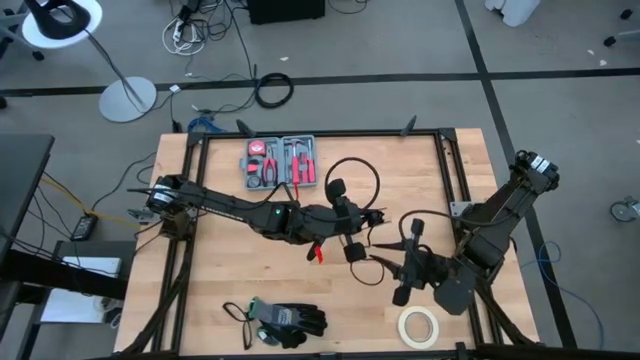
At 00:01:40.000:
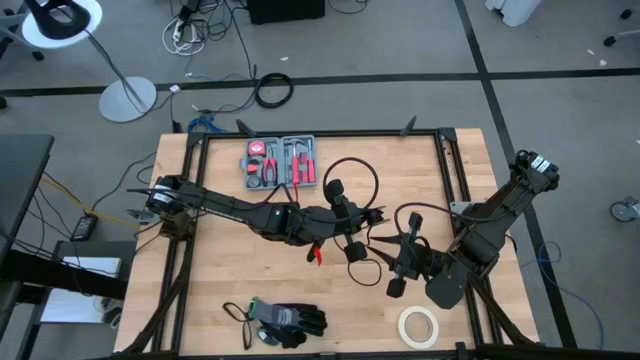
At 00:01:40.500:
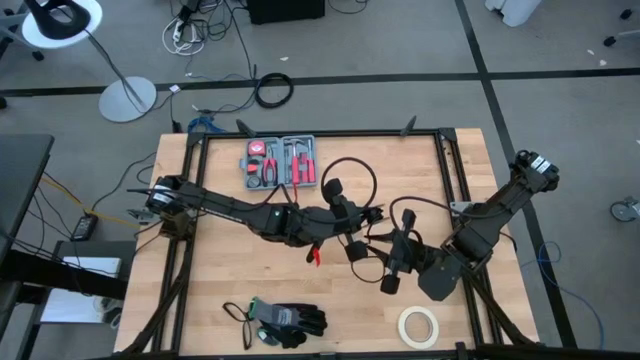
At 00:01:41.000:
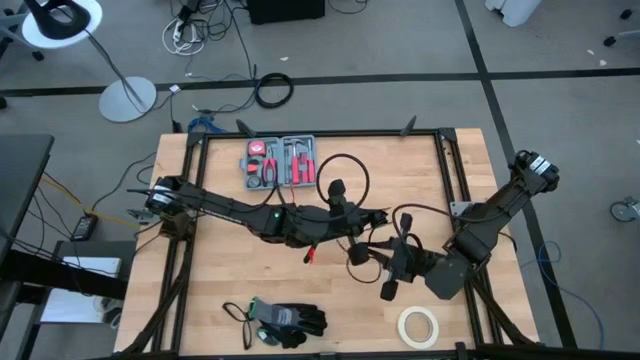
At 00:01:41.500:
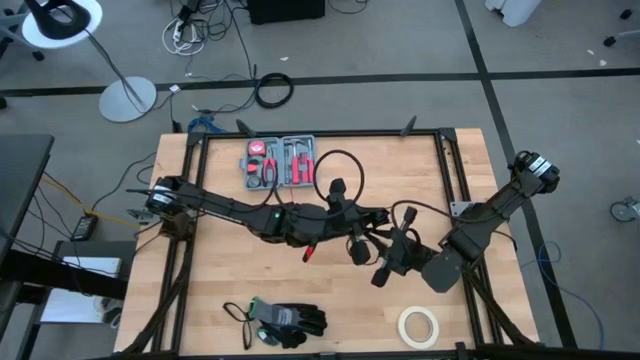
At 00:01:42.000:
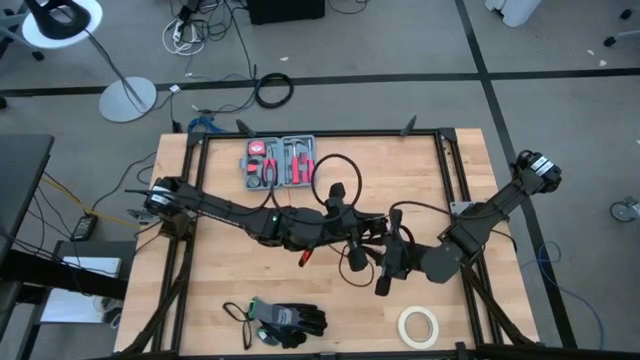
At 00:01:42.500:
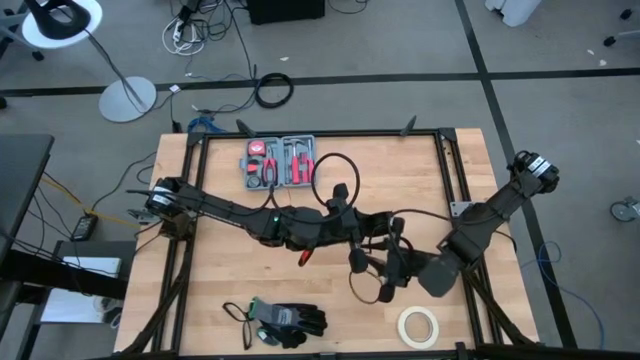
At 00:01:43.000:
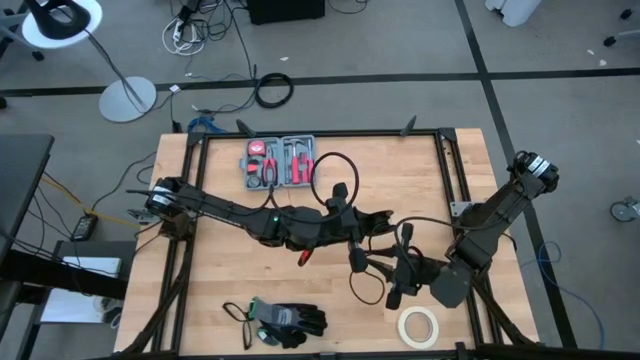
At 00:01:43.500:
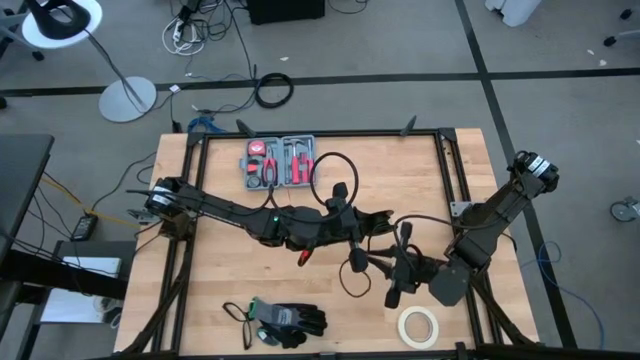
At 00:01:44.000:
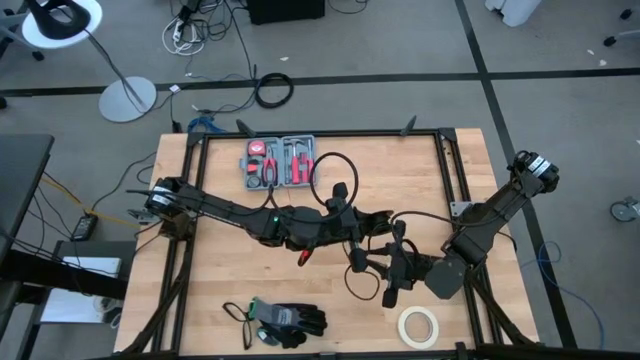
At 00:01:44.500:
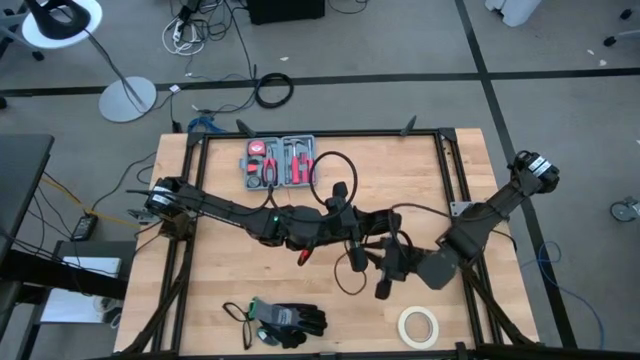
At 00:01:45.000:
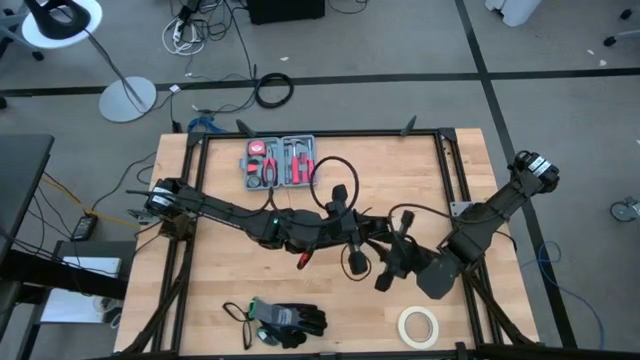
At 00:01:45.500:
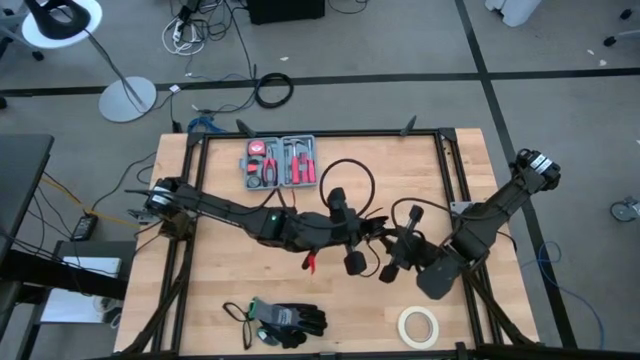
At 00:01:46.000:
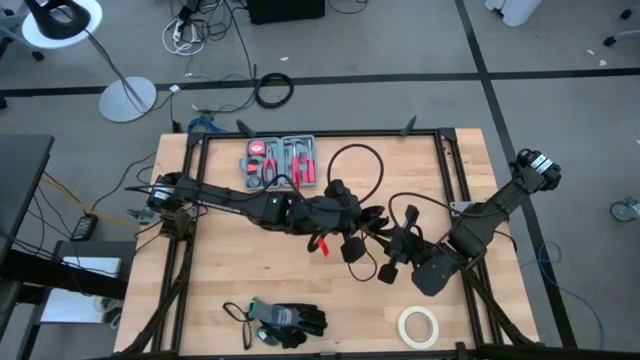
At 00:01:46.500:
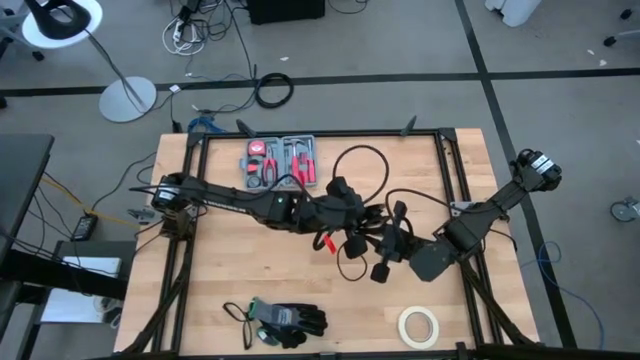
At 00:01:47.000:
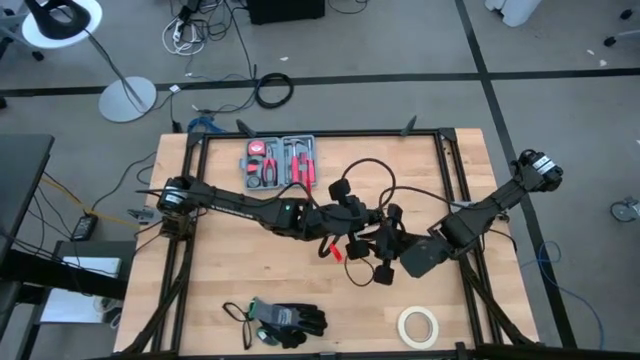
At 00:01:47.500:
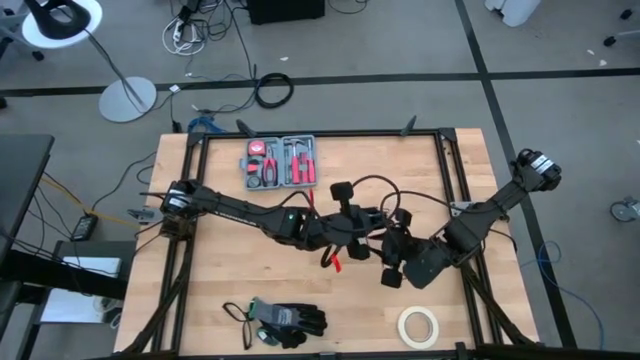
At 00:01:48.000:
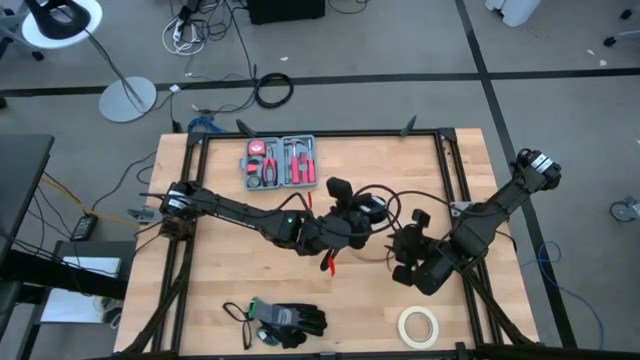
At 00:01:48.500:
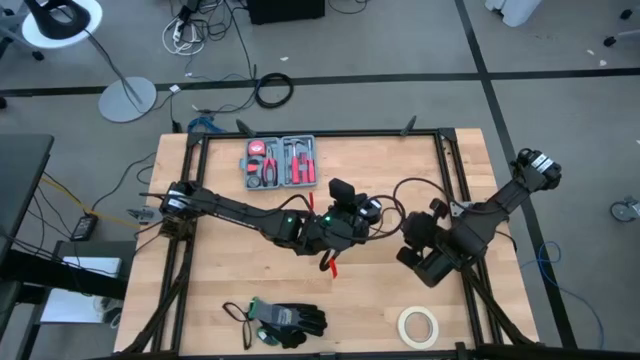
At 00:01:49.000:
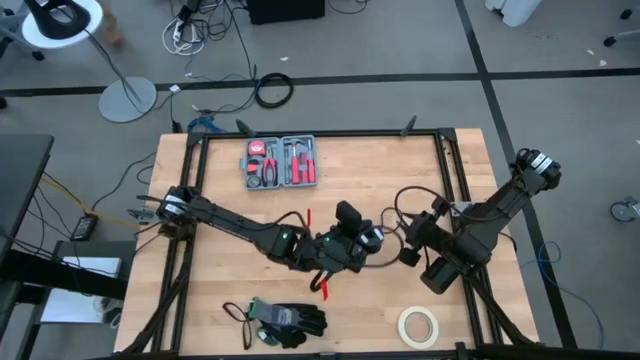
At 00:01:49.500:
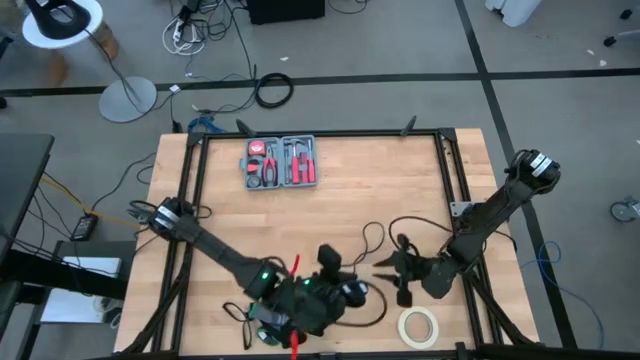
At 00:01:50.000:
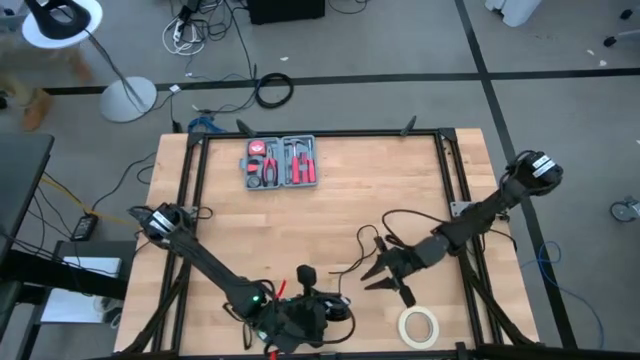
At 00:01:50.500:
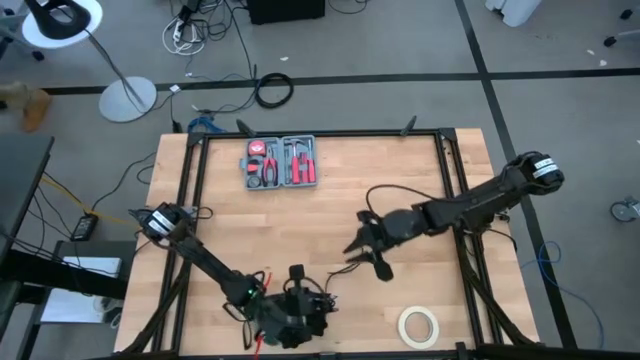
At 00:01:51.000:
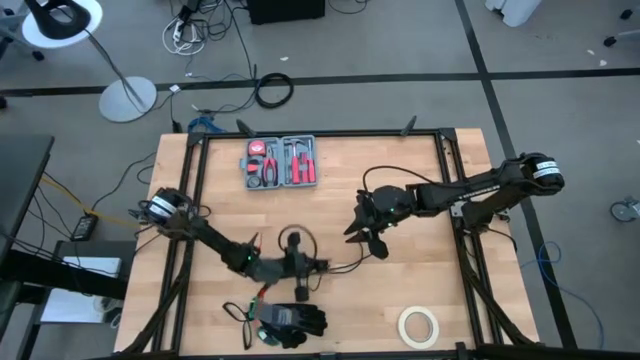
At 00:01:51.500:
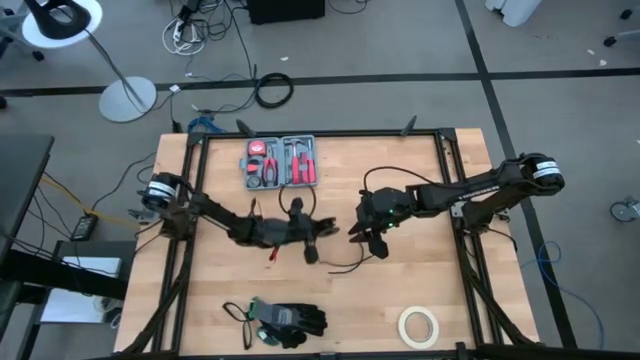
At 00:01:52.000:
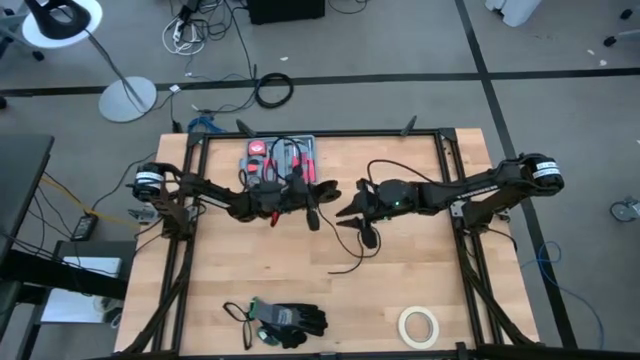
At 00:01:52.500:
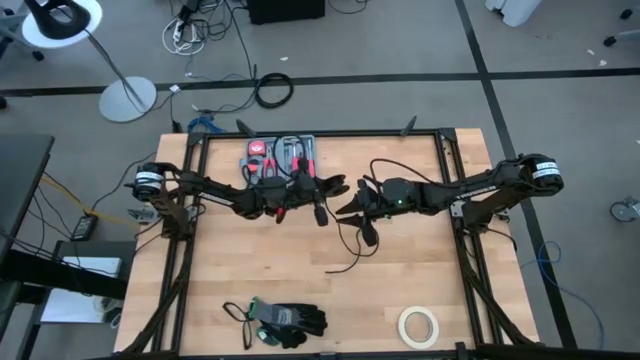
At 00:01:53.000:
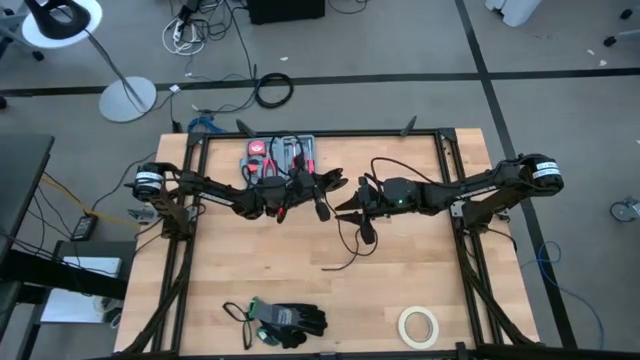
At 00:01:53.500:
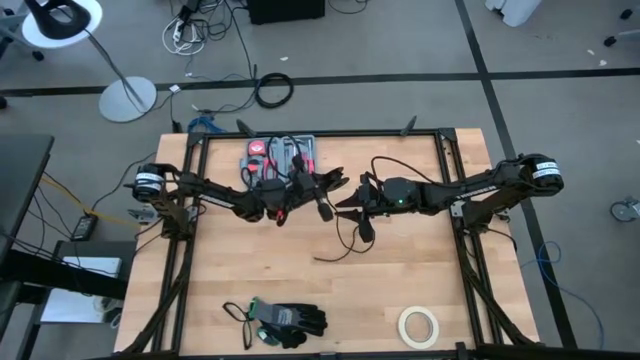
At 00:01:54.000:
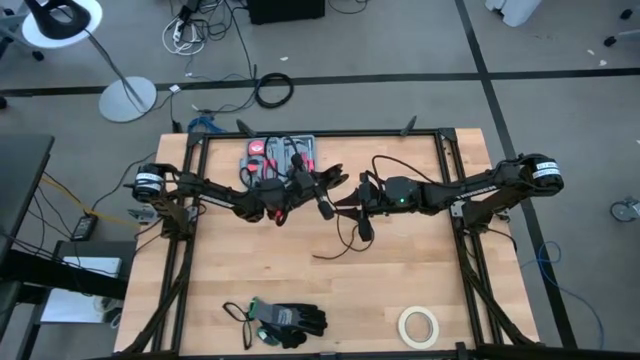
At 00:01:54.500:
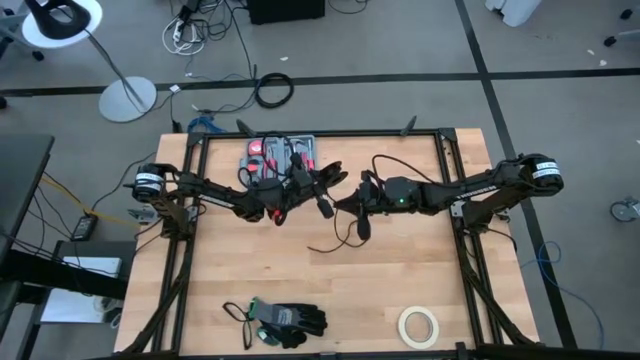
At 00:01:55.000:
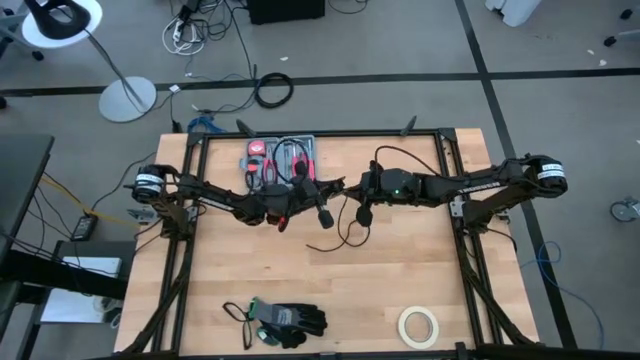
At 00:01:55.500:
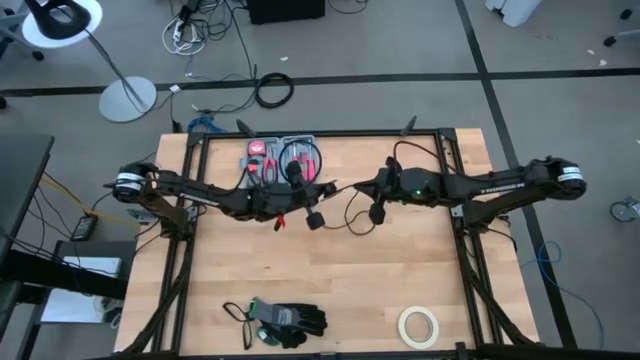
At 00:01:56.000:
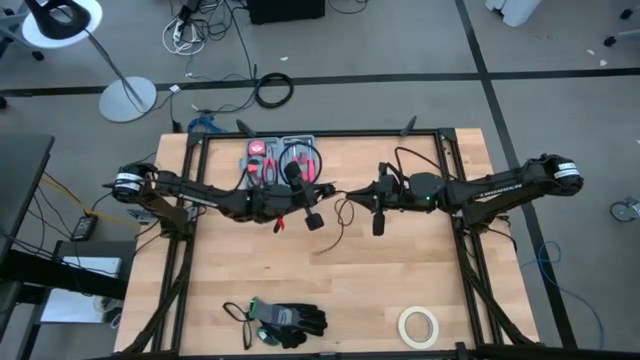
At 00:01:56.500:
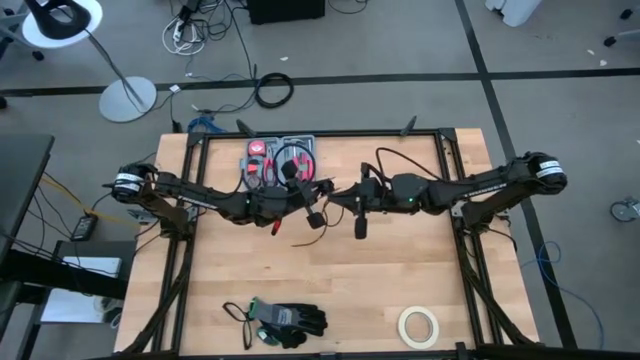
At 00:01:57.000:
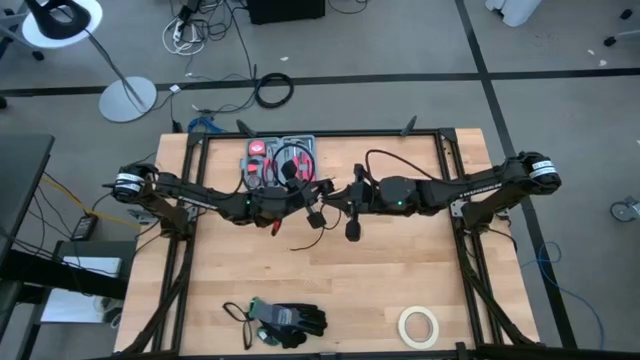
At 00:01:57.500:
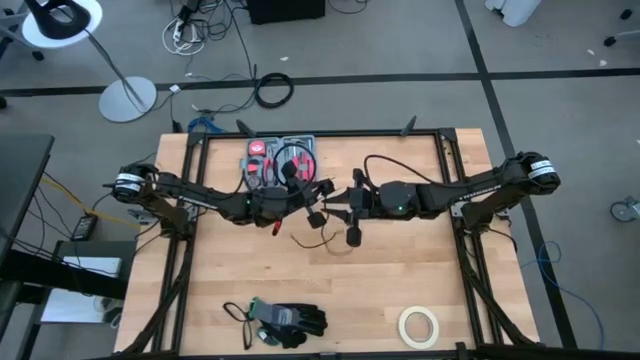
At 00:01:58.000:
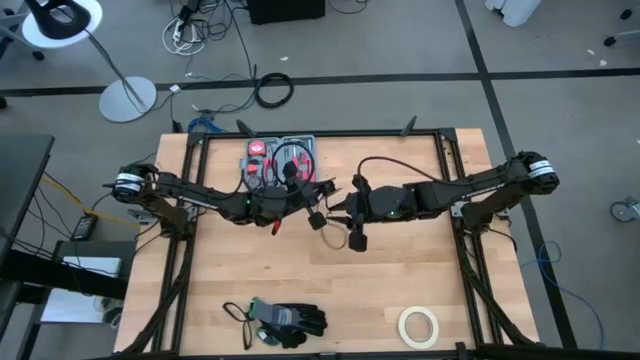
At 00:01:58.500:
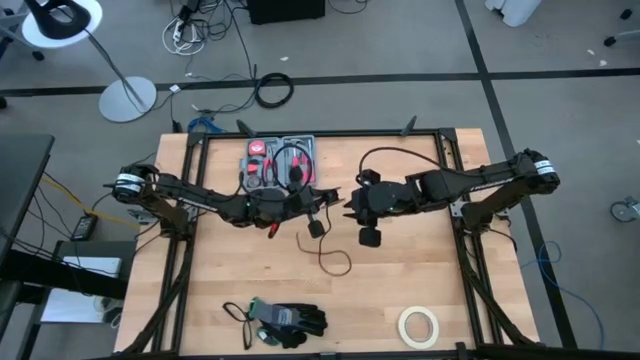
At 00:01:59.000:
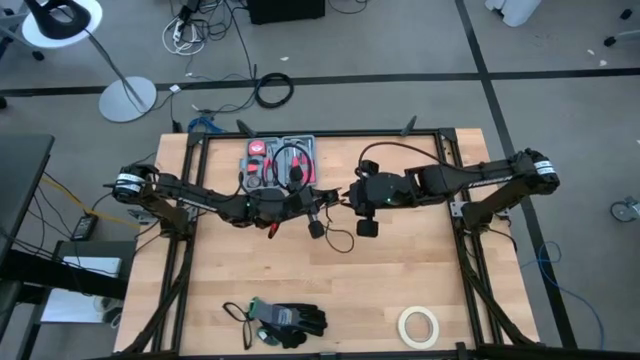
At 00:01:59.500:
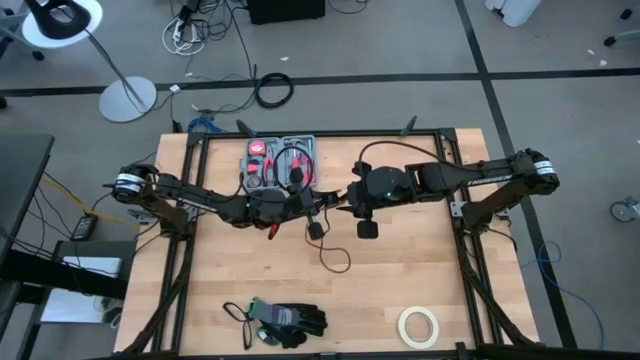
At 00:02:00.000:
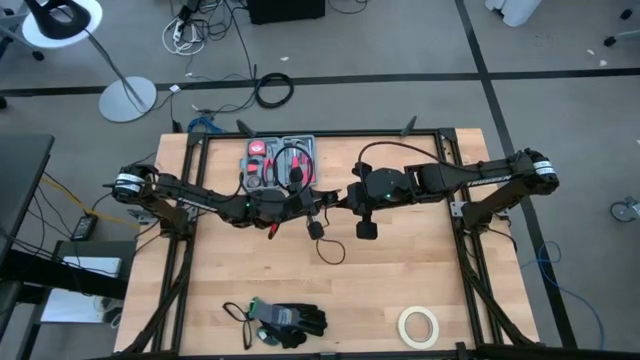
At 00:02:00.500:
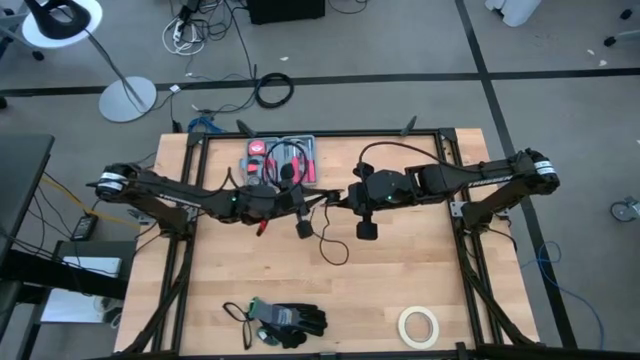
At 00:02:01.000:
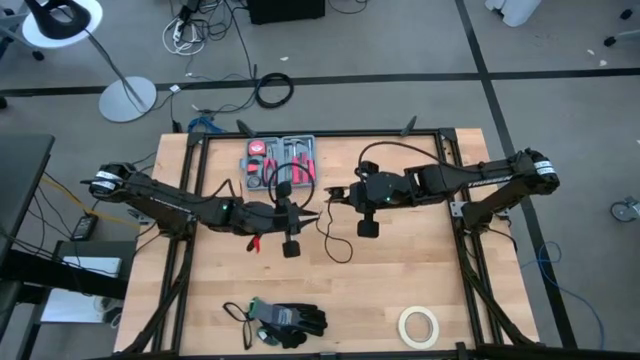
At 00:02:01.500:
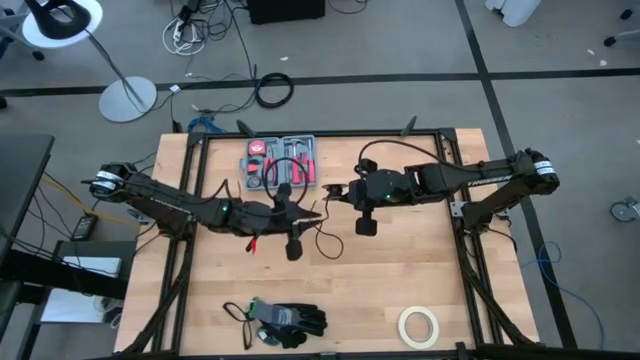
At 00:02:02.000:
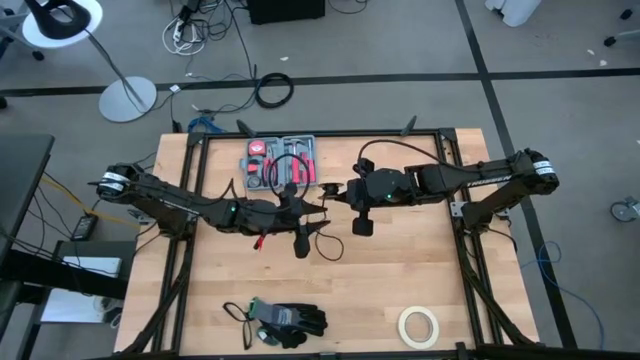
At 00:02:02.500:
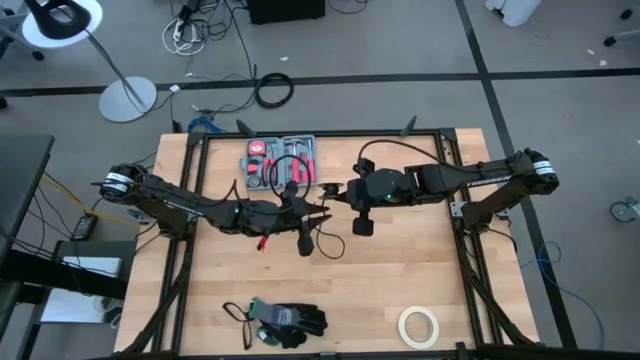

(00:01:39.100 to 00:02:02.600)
Task: Coil cords
Coil the black wire cable into the black spool
